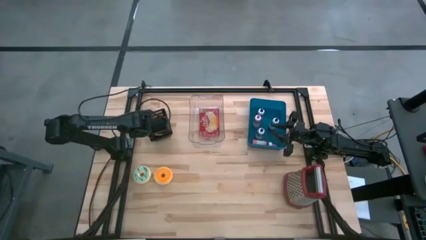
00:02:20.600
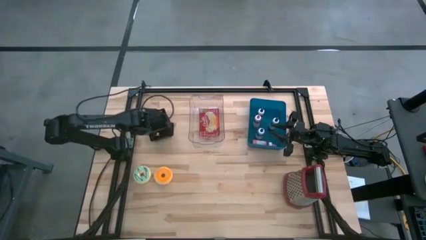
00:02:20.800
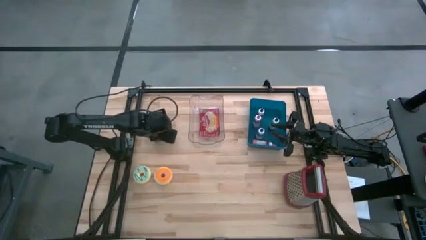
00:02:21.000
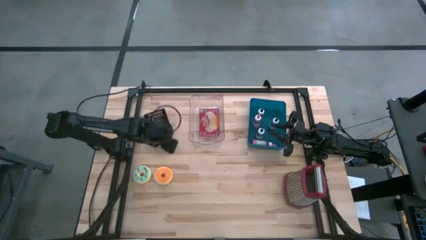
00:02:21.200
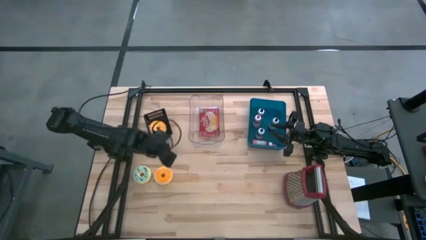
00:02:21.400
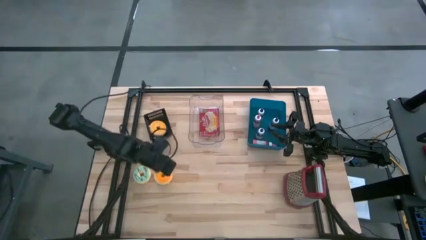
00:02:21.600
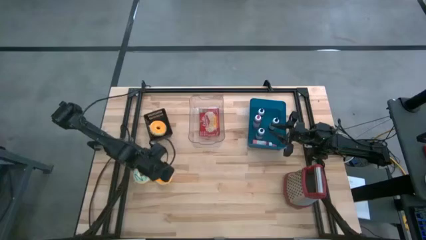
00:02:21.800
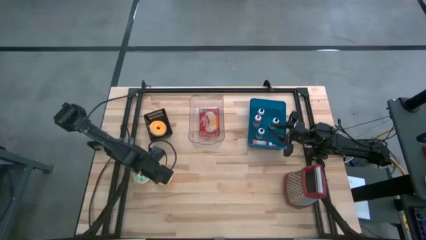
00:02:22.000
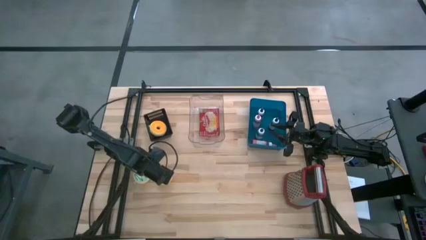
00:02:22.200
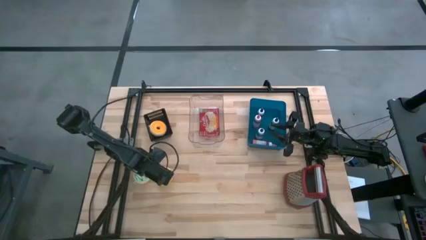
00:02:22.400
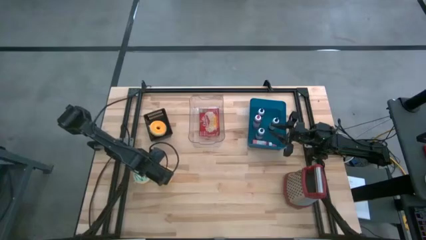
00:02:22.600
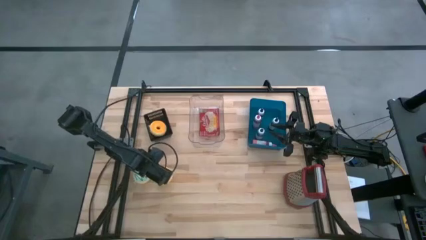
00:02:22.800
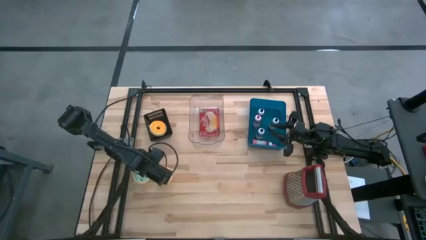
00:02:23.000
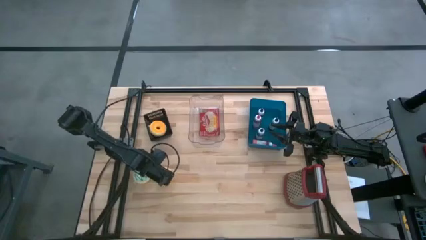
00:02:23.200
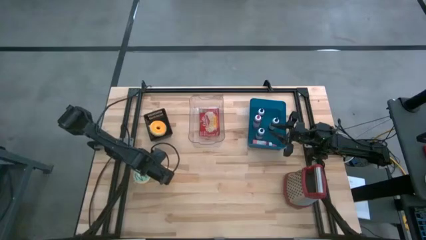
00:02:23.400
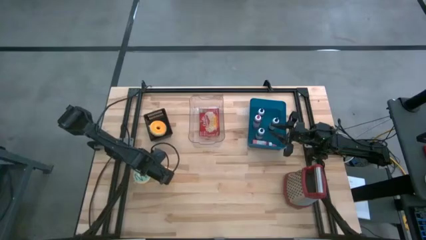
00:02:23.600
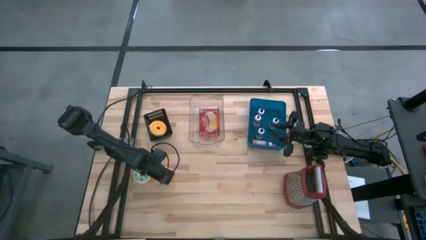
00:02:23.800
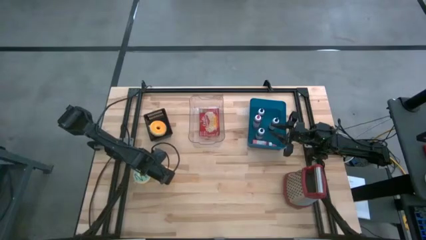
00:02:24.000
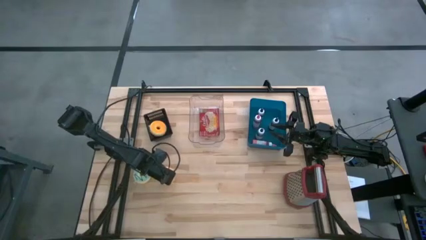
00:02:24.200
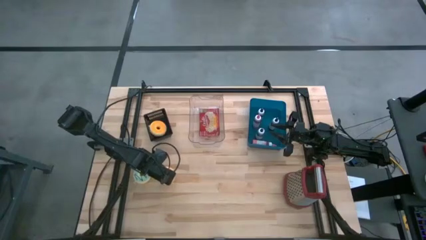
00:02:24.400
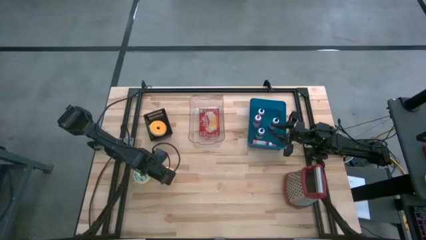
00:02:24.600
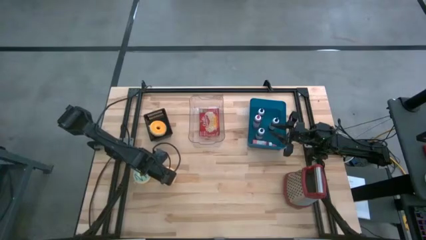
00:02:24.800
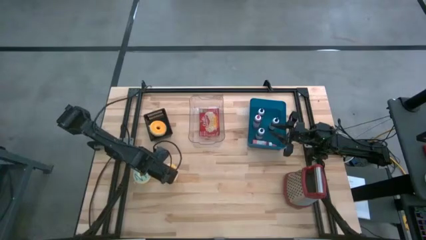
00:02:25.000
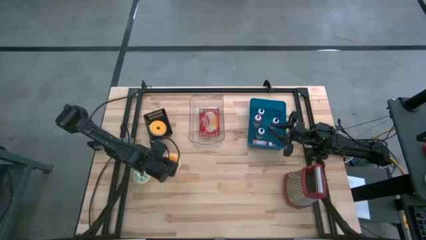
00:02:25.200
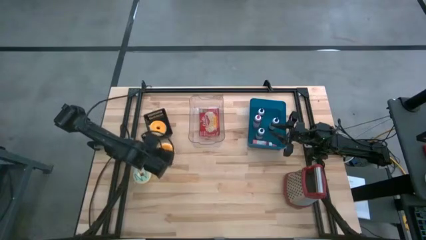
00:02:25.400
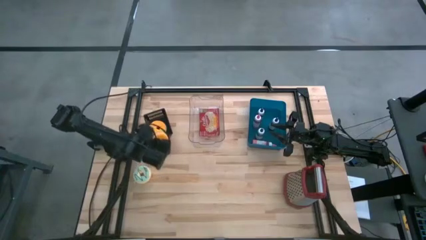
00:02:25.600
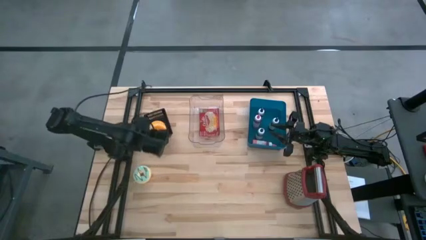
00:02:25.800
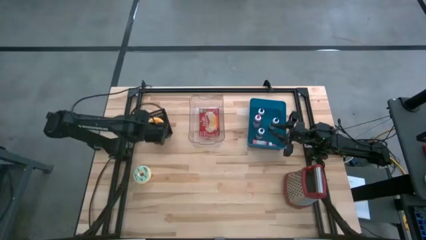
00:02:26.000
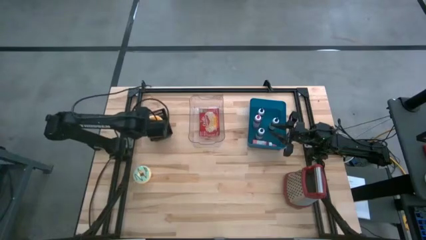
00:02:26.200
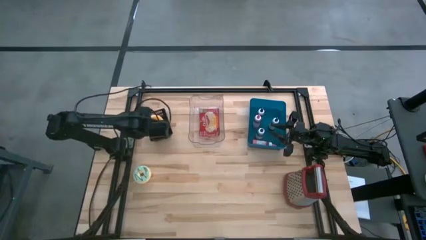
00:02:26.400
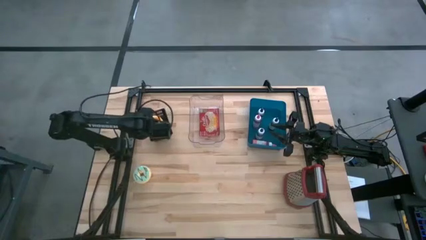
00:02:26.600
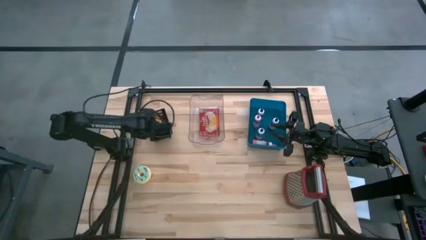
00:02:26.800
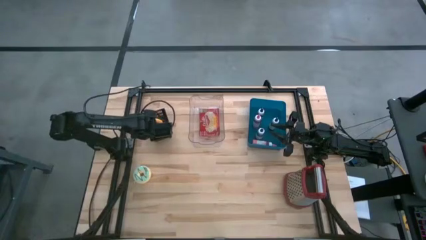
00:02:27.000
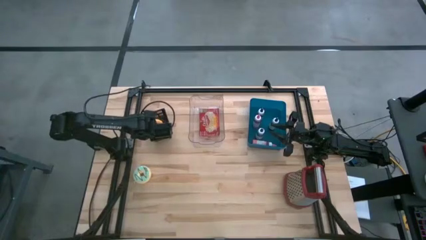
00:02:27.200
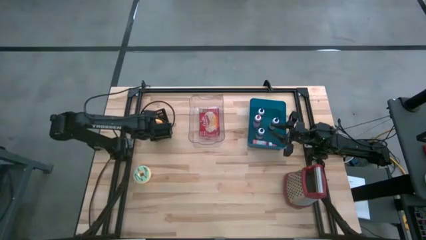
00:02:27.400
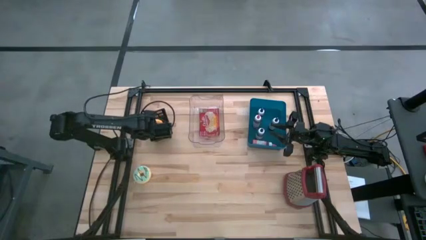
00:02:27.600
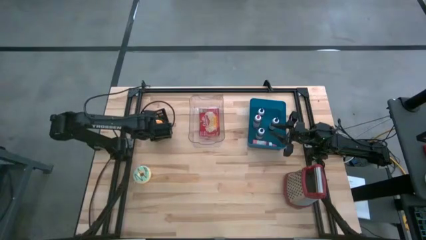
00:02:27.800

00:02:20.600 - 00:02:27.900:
Task: Pick & Place Food Item
Put the orange donut into the black bin

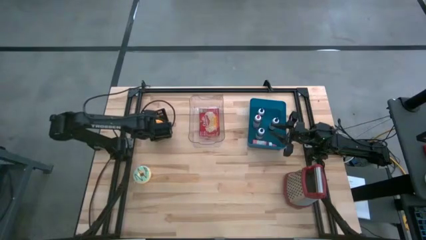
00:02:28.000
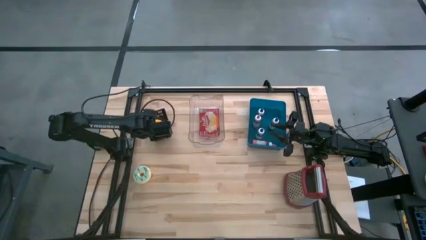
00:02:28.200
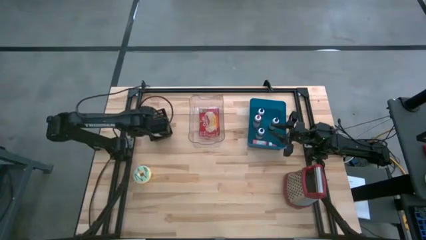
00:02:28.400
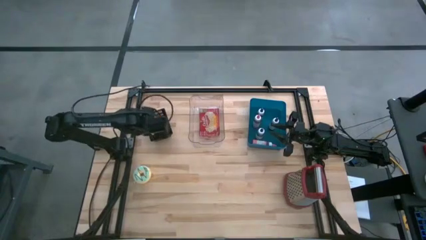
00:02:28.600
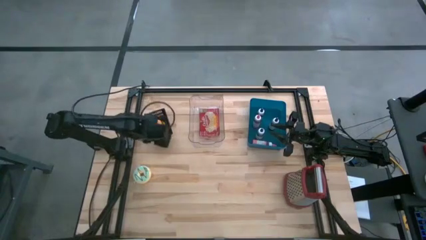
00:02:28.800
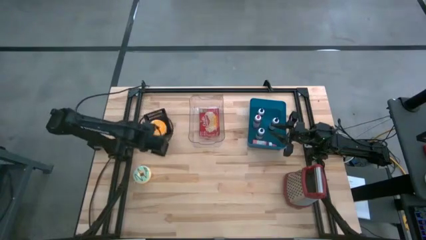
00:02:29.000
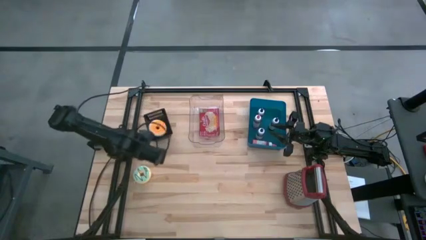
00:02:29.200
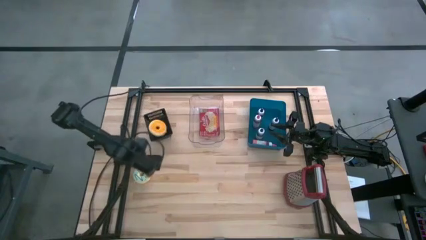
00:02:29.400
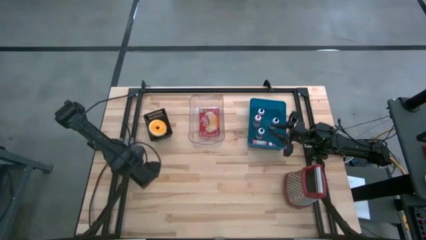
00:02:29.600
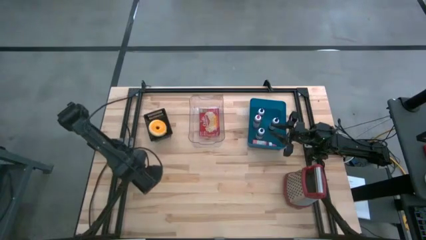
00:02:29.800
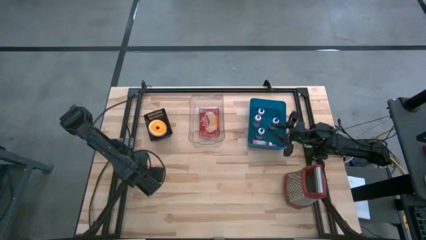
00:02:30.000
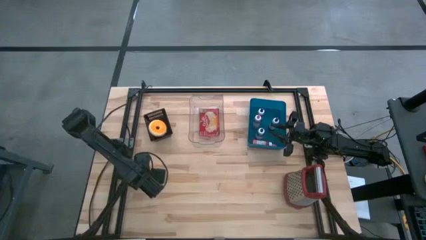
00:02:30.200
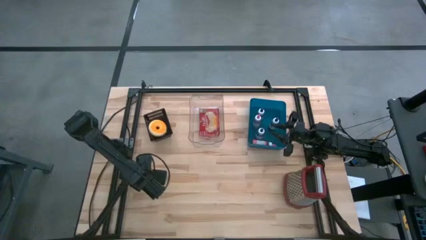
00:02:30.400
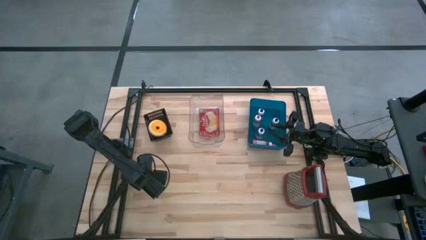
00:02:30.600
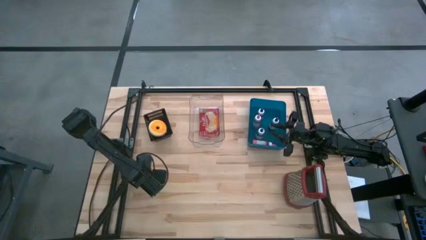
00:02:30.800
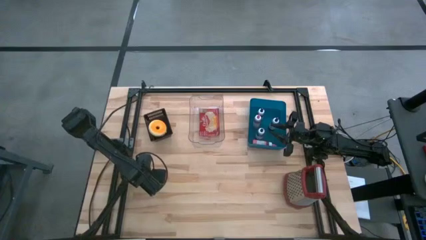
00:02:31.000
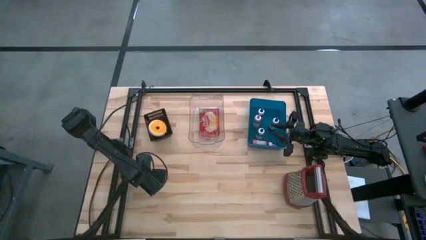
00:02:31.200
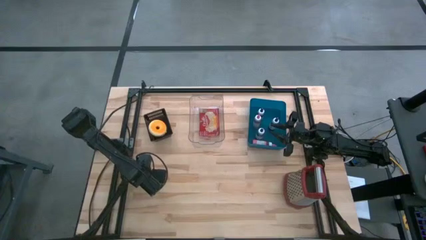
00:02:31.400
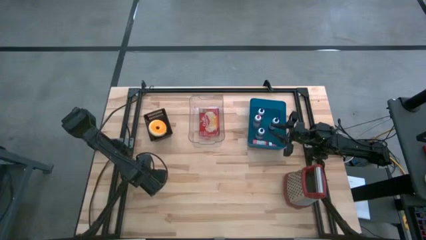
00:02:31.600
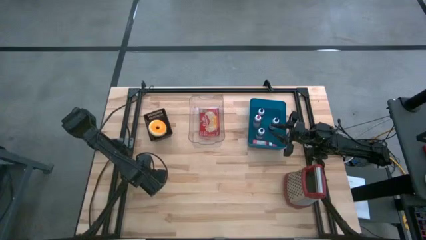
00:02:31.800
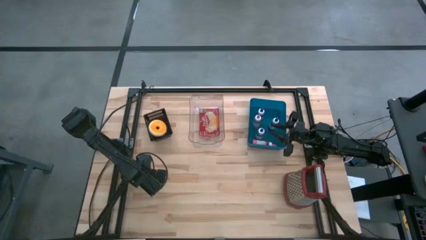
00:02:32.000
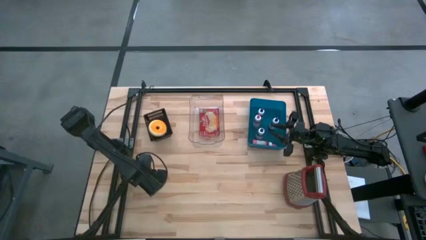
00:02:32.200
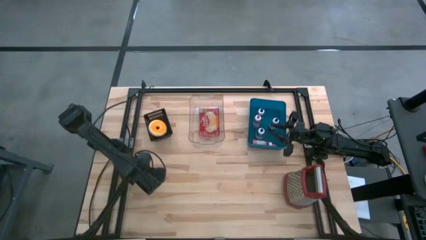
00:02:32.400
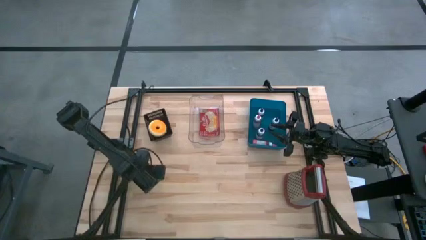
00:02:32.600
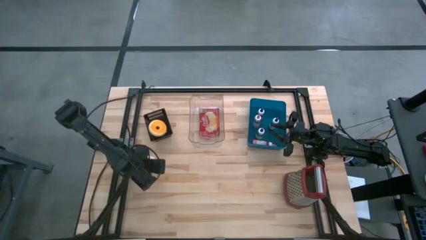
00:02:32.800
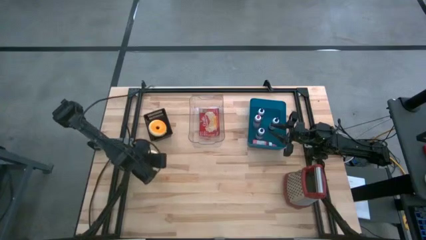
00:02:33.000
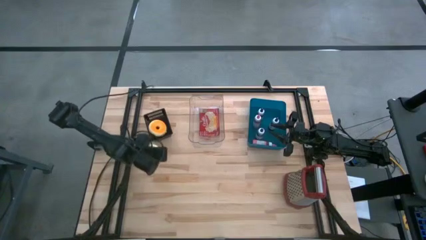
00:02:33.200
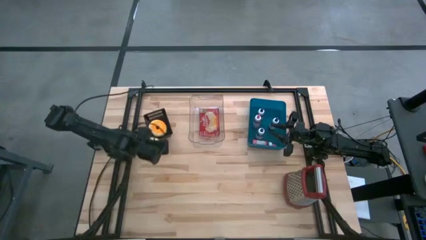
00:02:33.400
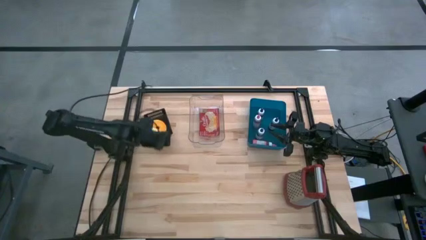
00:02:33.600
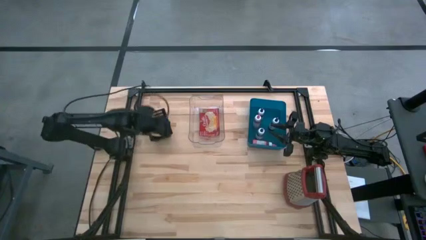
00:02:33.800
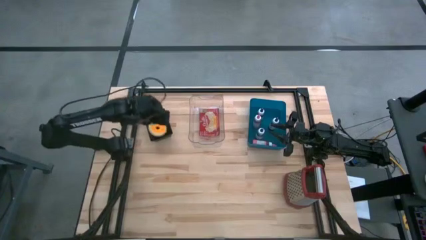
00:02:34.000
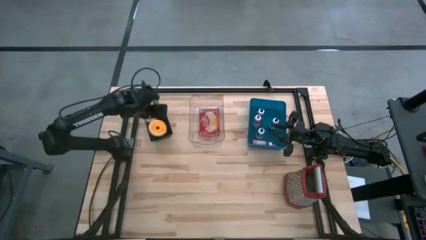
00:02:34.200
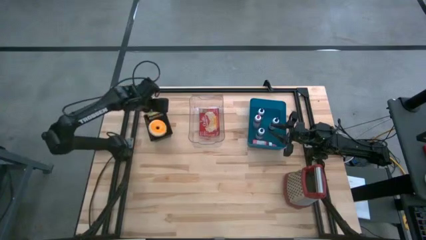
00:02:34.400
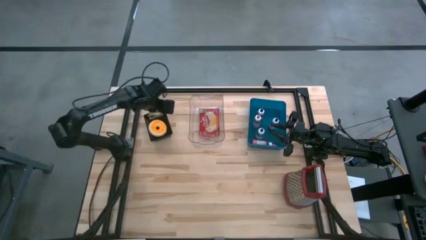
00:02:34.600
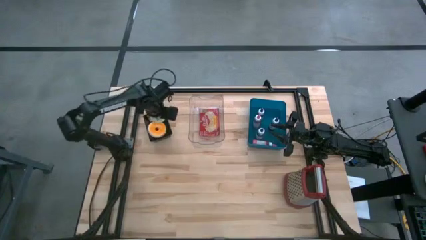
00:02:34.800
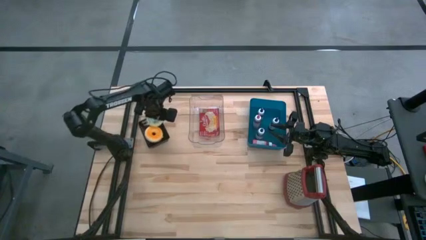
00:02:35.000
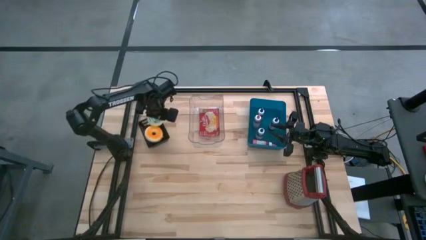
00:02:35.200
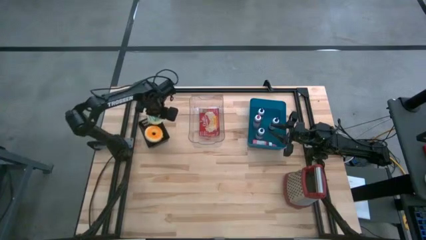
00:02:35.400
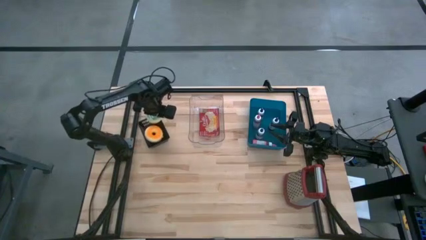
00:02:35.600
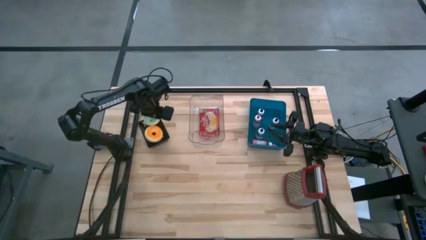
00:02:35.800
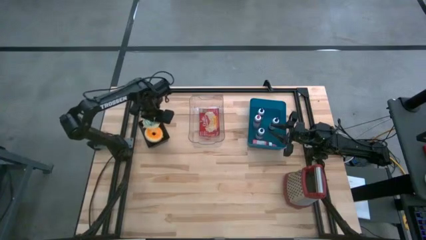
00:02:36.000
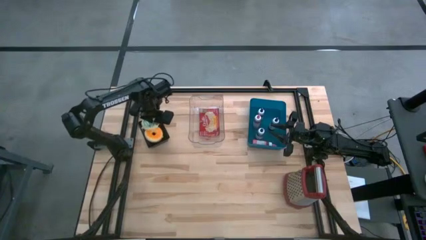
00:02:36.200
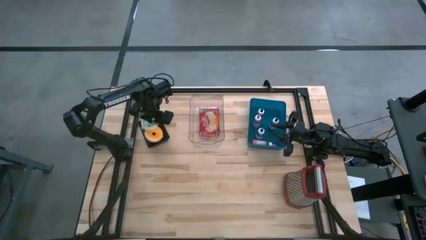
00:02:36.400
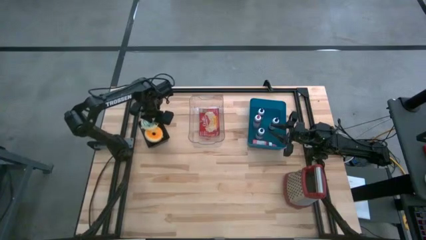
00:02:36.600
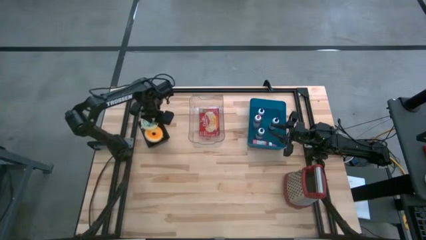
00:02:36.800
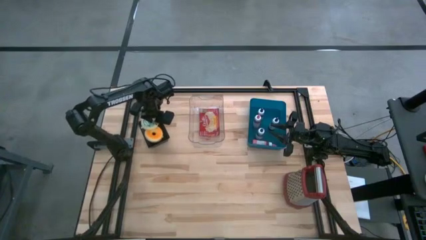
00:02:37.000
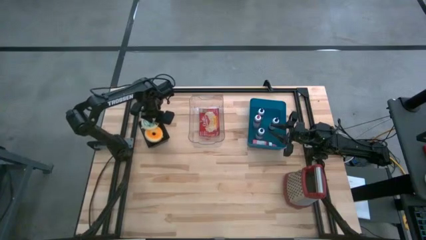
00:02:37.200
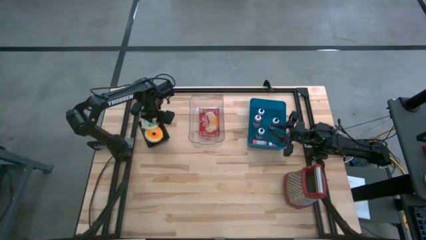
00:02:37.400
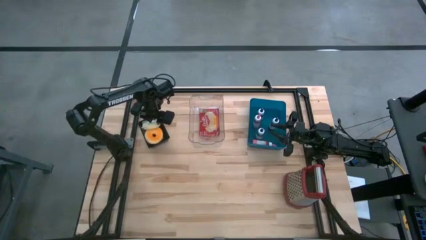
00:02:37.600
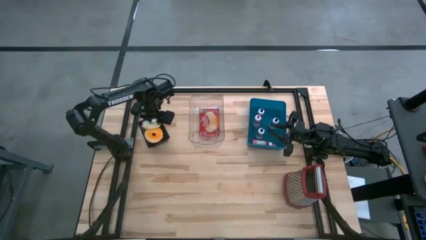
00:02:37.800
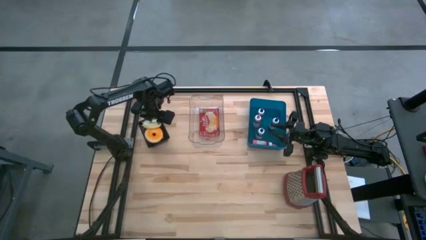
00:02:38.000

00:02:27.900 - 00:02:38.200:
Put the blue donut into the black bin
